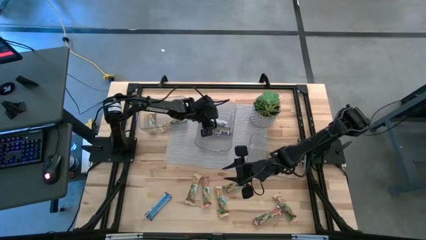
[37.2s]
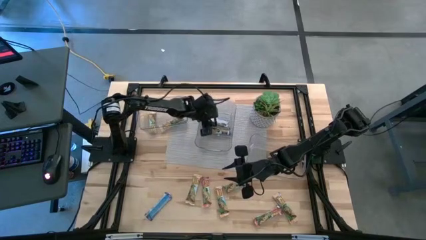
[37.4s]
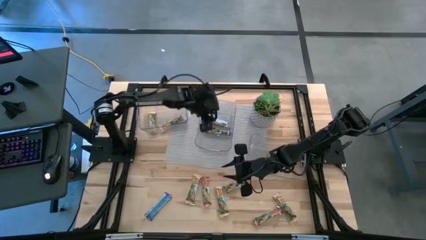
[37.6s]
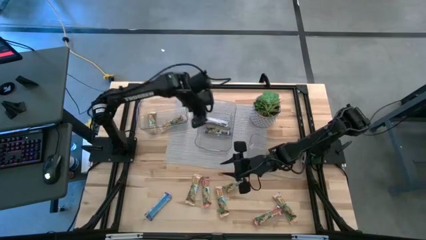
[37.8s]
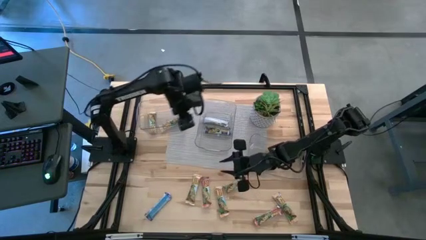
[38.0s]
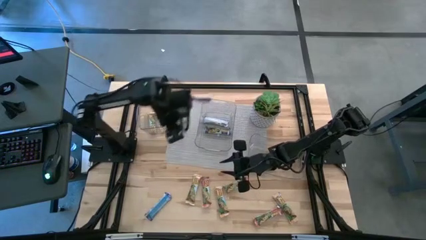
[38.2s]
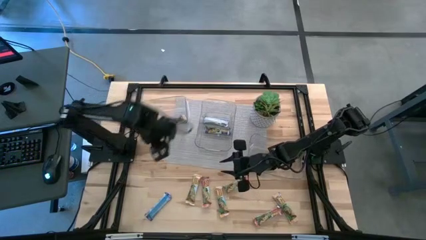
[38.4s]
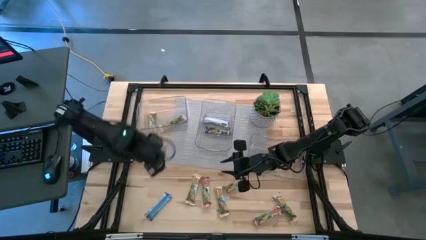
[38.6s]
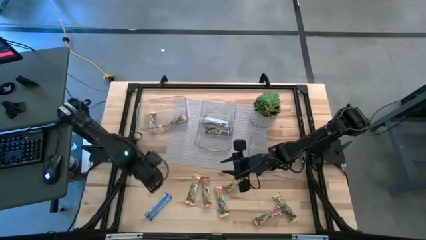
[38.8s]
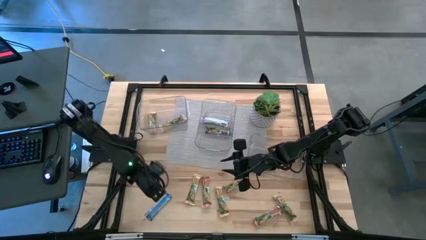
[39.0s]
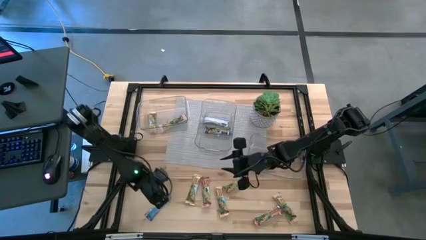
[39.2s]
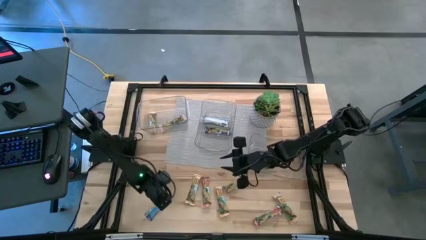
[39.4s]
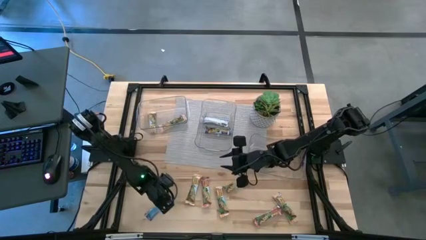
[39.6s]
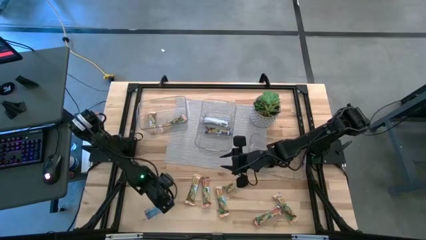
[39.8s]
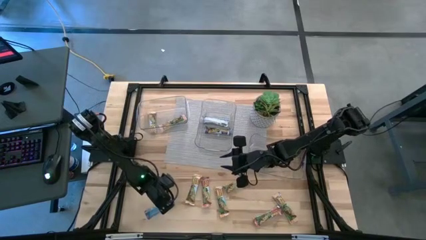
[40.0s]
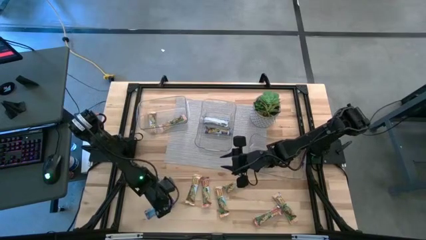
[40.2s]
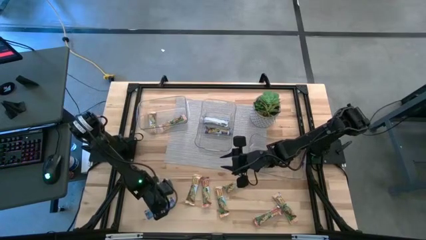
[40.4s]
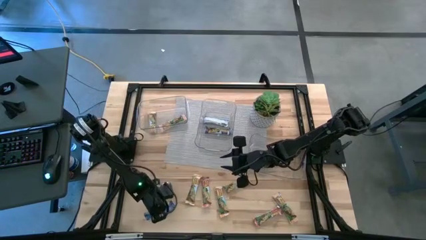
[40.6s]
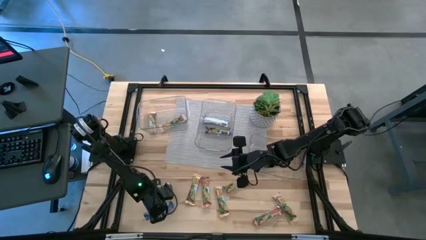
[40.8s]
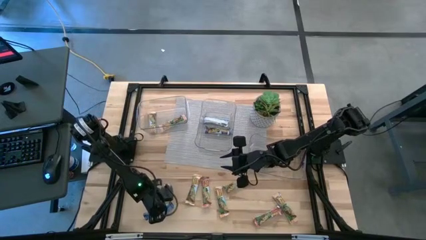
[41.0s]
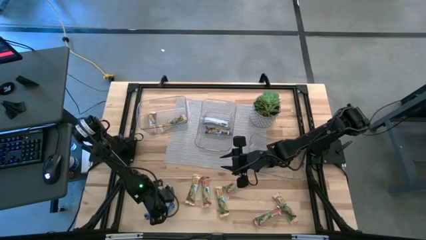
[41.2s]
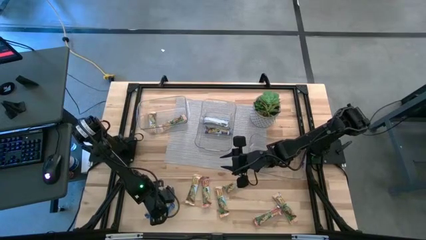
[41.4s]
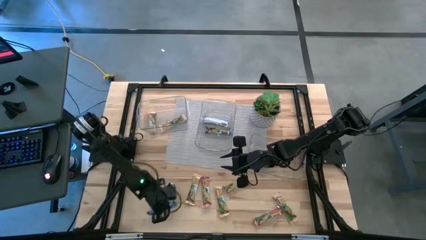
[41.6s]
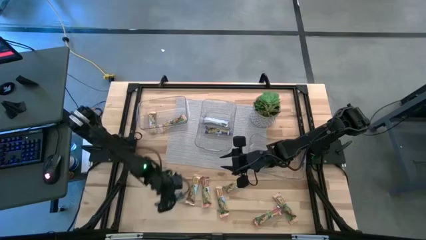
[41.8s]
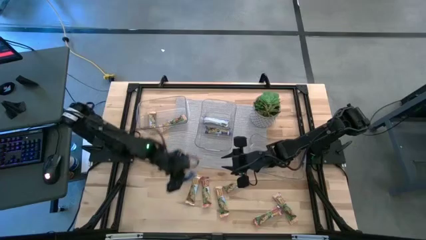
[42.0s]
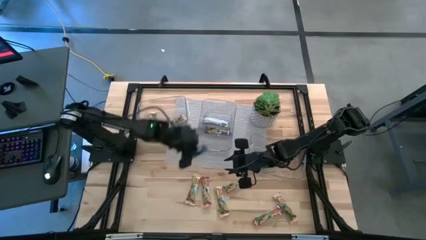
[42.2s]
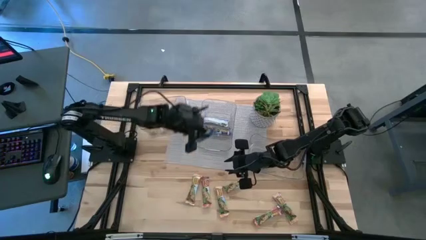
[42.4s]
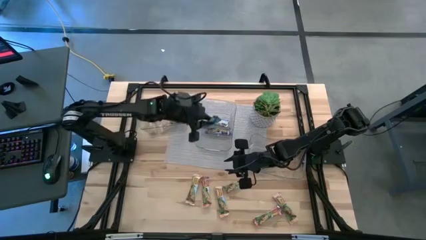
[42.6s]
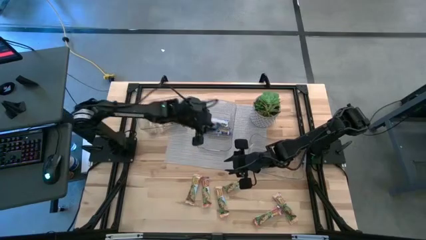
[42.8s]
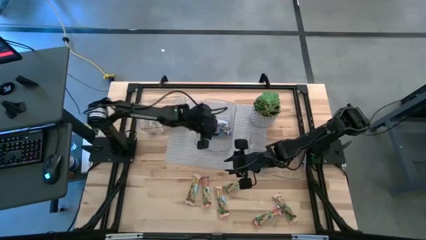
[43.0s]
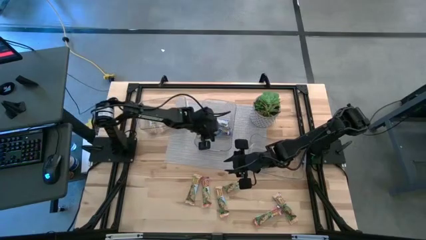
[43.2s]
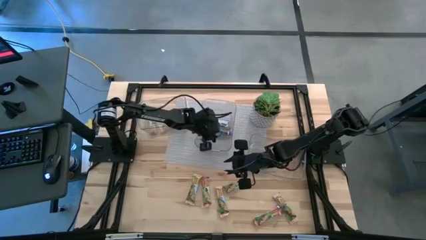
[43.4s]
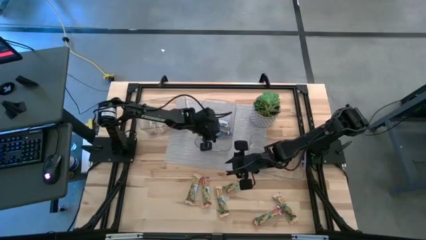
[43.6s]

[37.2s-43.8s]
Task: Pick and place Granola Bars by type
Put the blue granola bar into the middle transparent bin

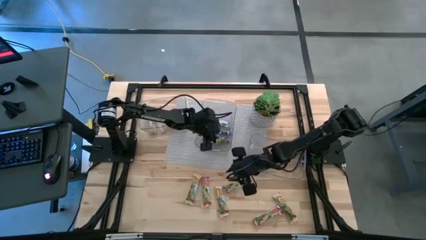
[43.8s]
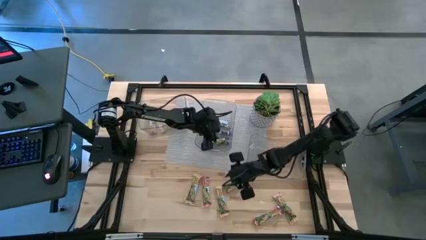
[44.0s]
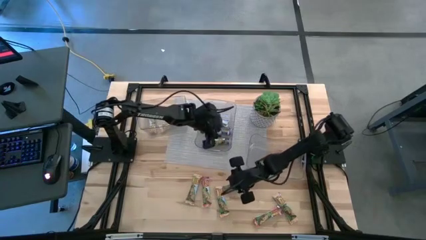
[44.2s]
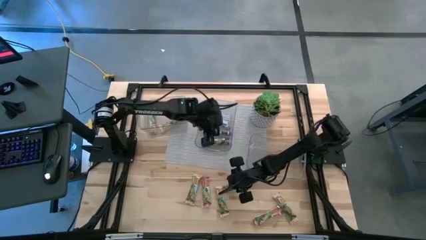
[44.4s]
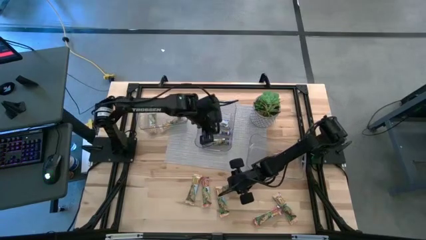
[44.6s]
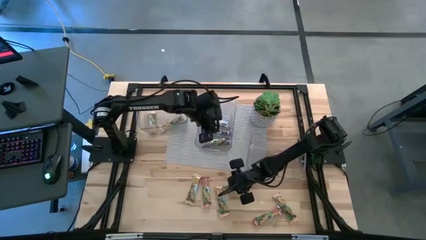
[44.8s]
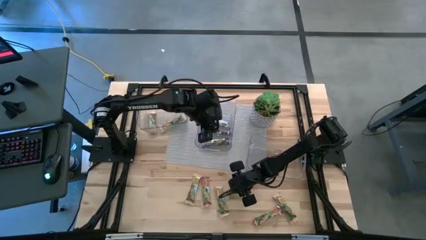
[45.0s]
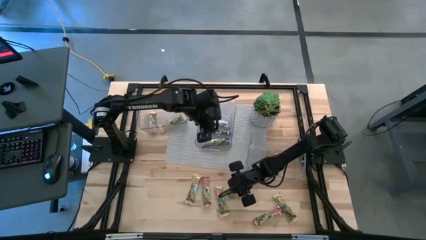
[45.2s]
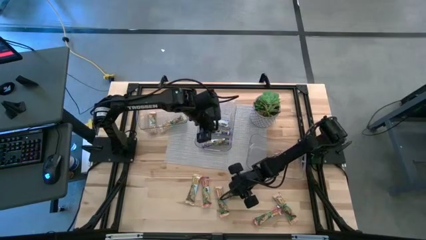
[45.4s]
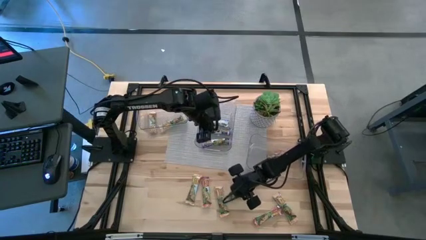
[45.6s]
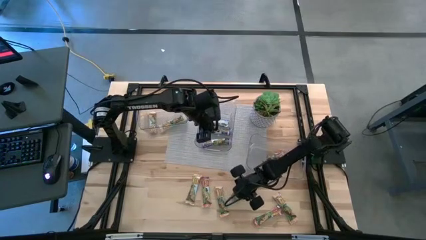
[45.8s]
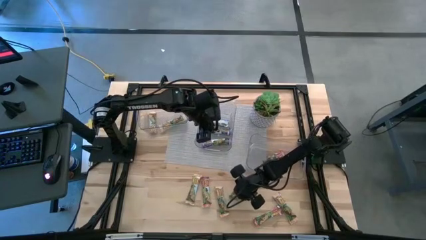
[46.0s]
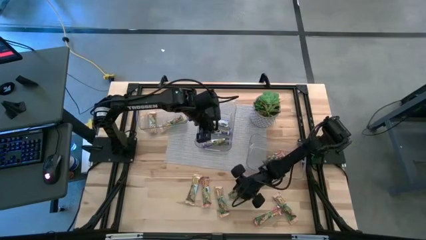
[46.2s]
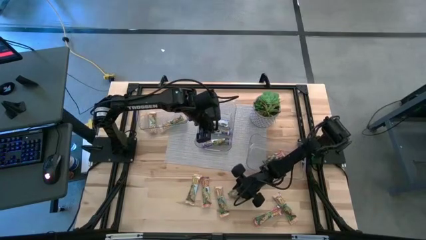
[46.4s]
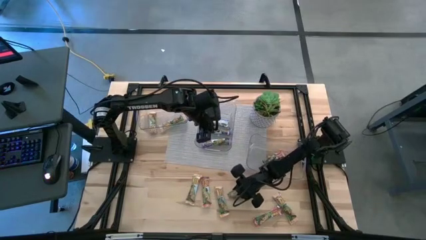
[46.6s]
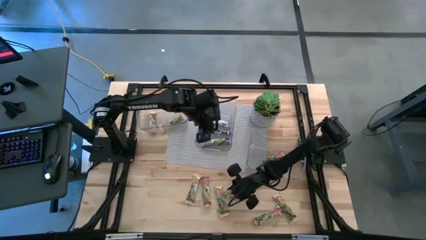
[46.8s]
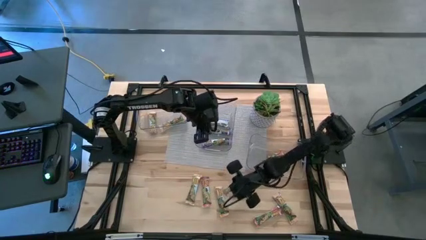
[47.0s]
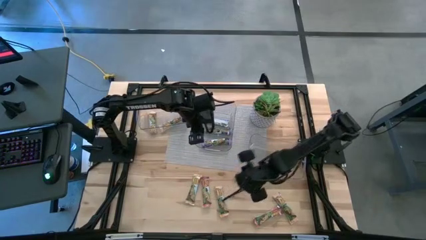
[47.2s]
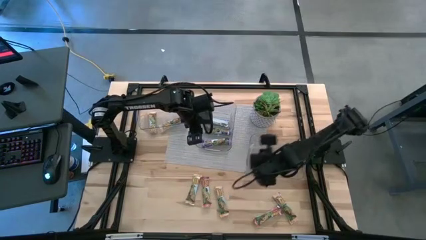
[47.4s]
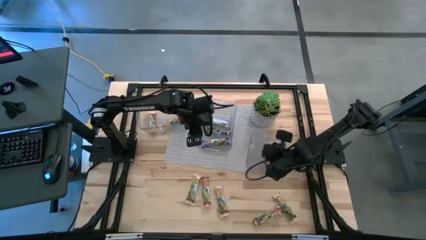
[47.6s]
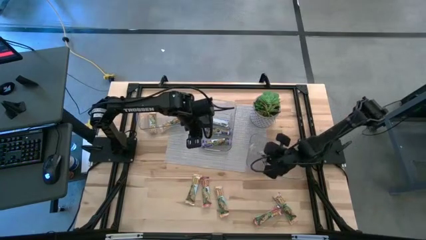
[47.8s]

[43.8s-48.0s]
Put the red granola bar into the right transparent bin

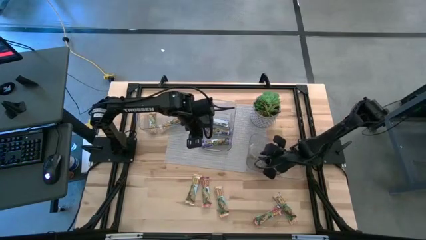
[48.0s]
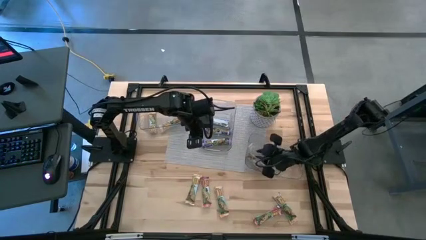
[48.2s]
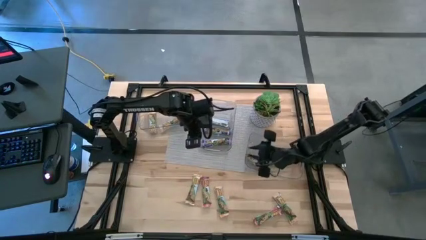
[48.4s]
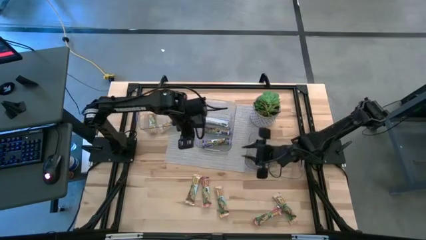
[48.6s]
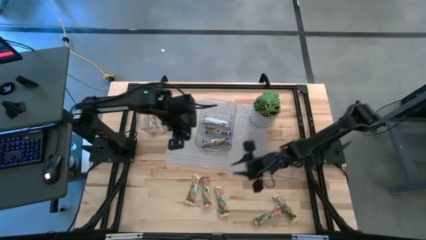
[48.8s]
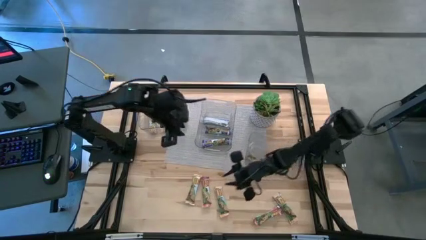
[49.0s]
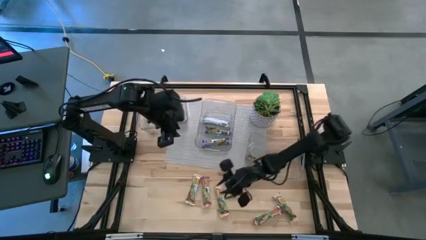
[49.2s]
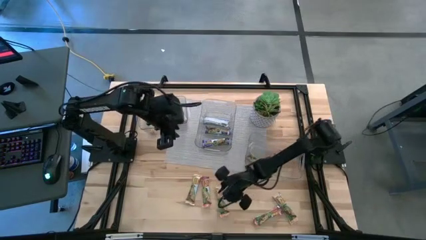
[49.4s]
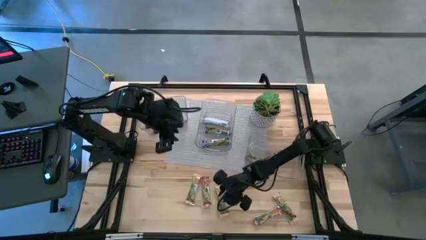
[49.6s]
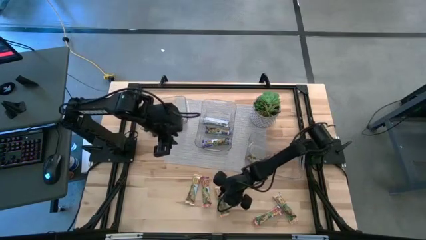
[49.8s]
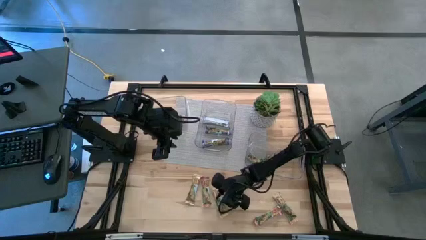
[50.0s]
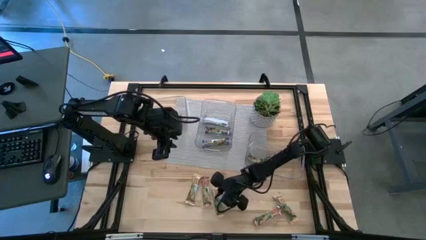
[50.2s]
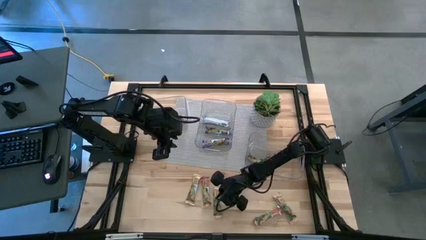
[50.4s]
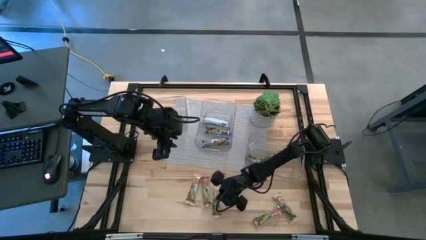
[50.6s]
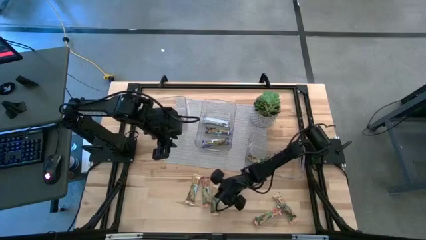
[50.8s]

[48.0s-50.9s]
Put the yellow granola bar into the left transparent bin
